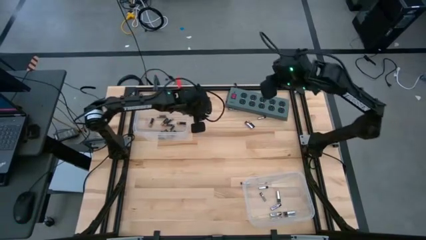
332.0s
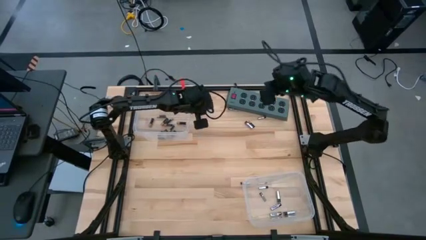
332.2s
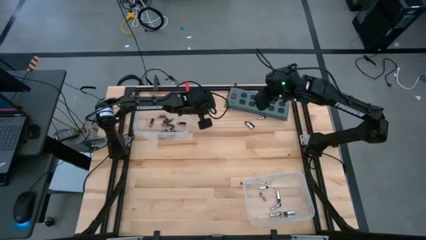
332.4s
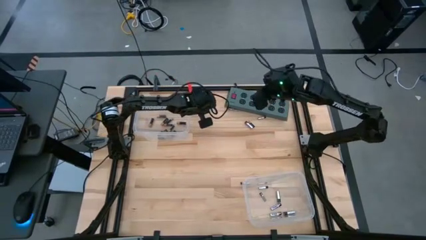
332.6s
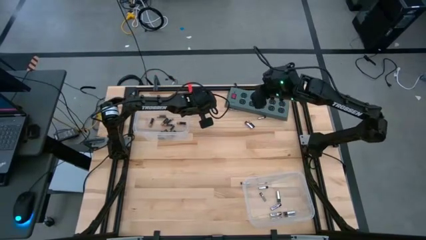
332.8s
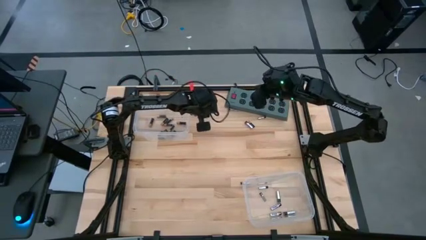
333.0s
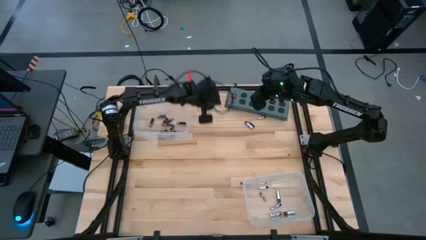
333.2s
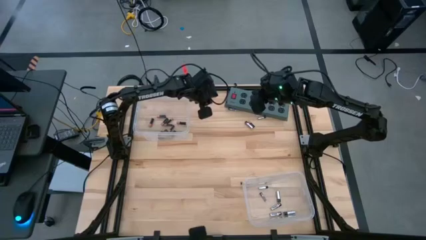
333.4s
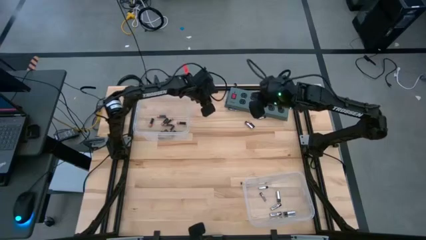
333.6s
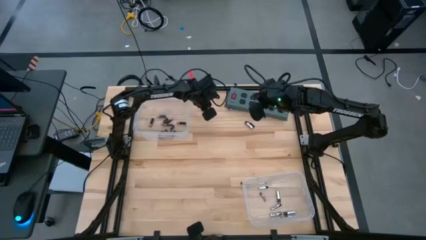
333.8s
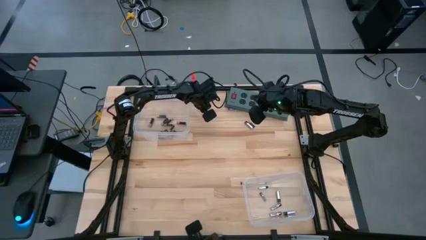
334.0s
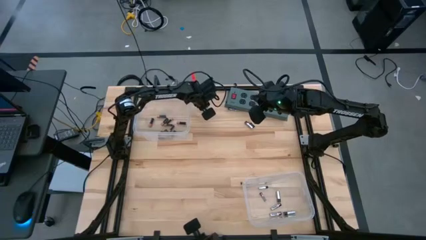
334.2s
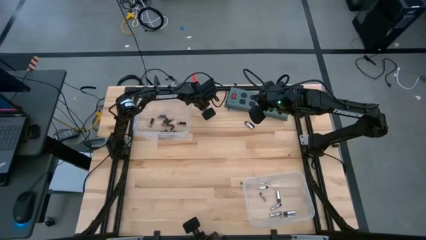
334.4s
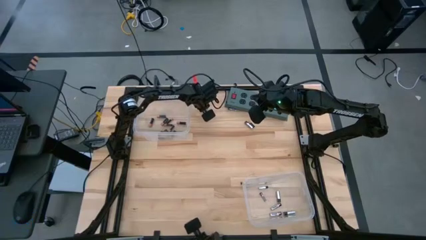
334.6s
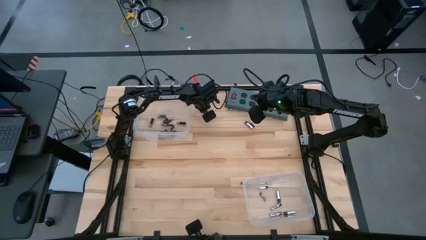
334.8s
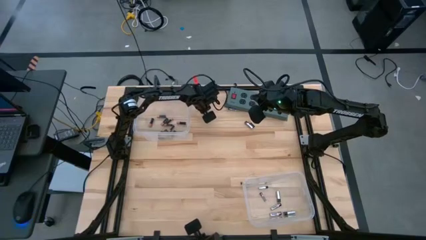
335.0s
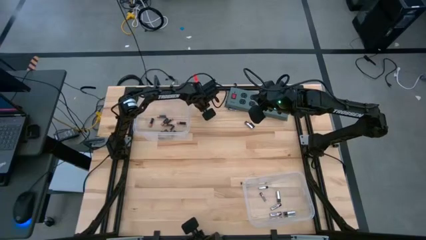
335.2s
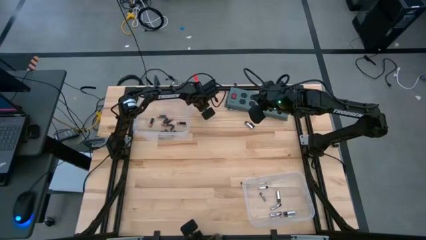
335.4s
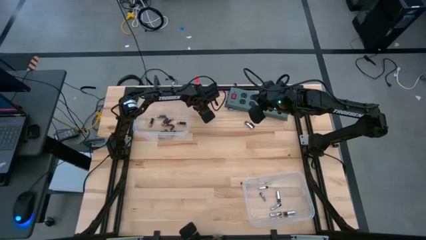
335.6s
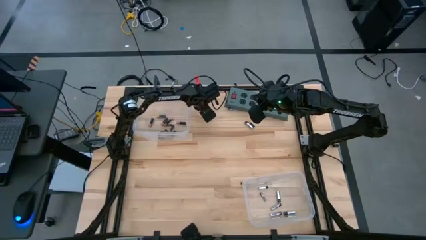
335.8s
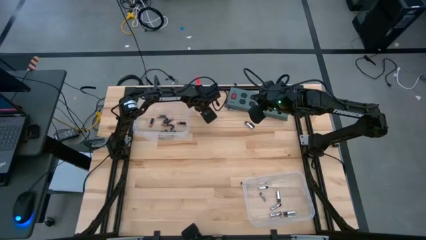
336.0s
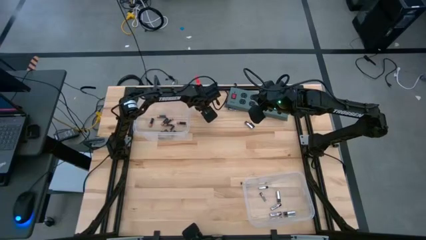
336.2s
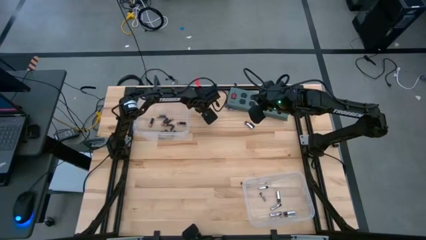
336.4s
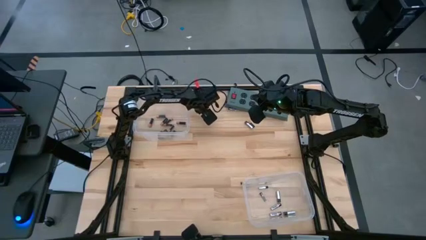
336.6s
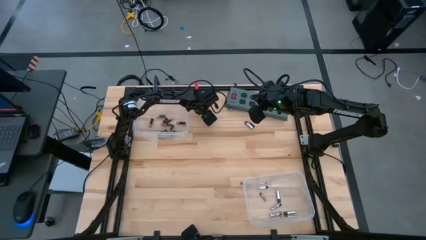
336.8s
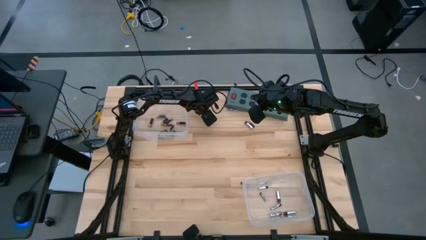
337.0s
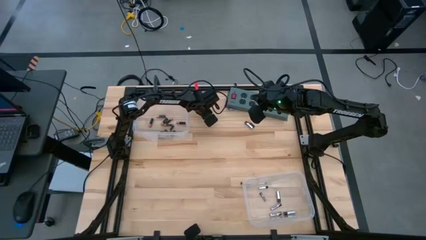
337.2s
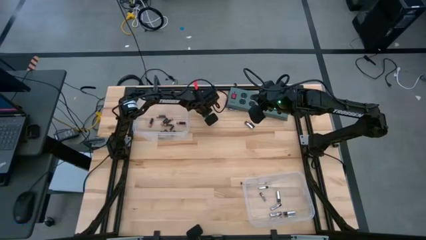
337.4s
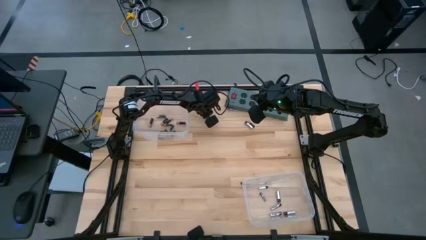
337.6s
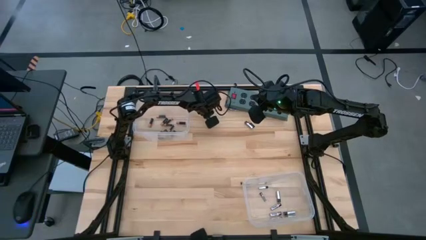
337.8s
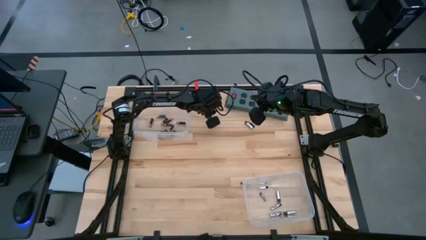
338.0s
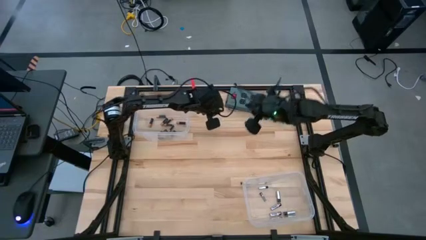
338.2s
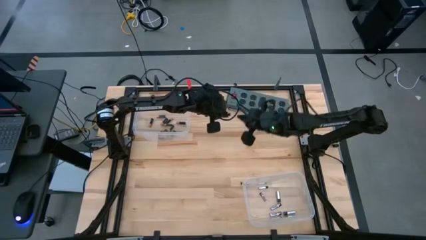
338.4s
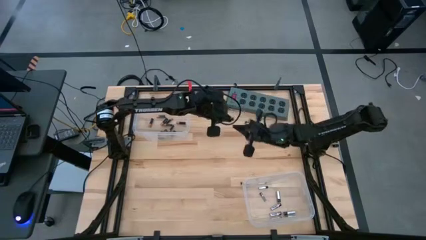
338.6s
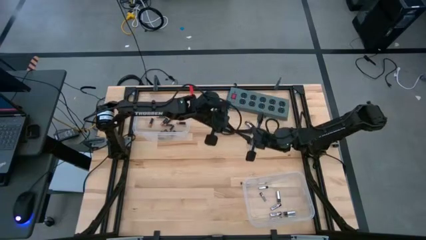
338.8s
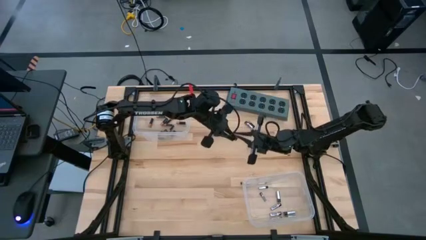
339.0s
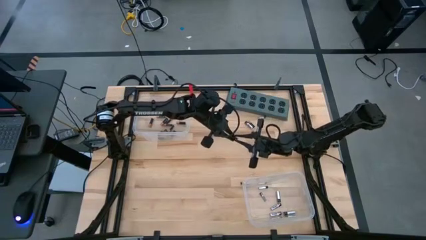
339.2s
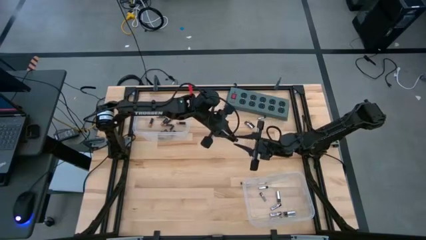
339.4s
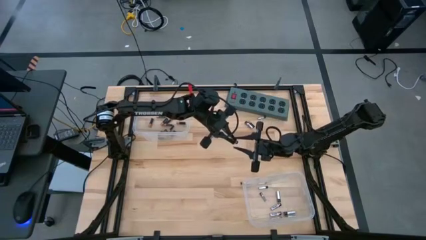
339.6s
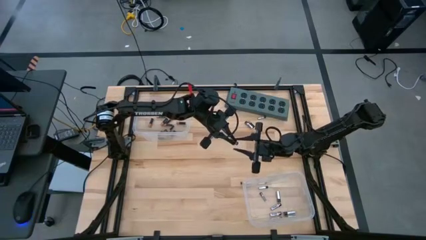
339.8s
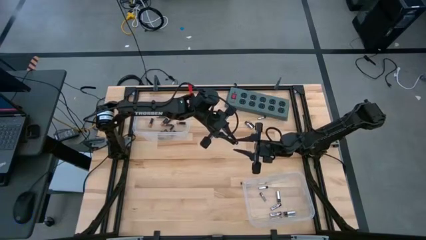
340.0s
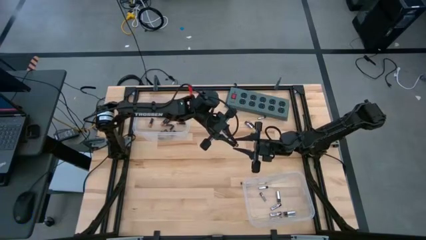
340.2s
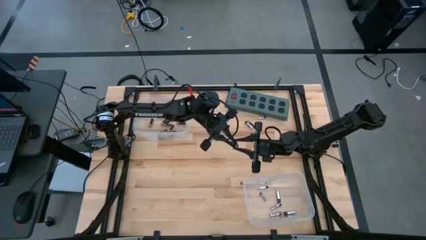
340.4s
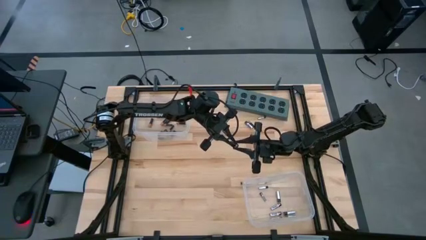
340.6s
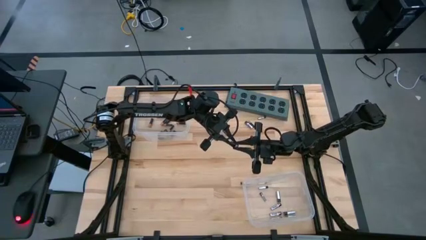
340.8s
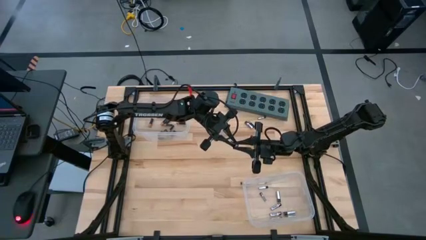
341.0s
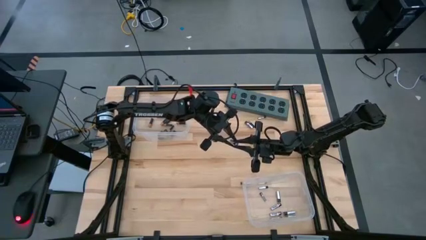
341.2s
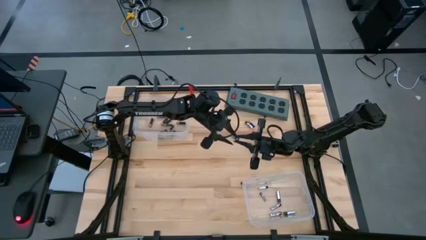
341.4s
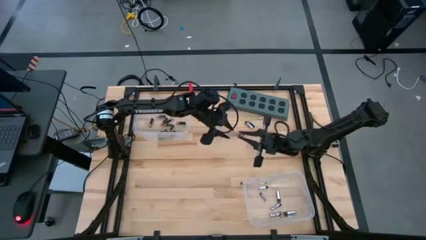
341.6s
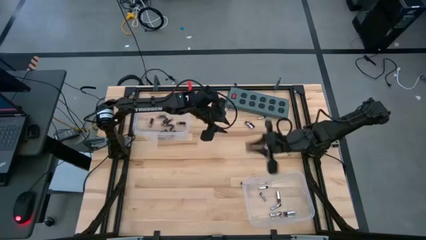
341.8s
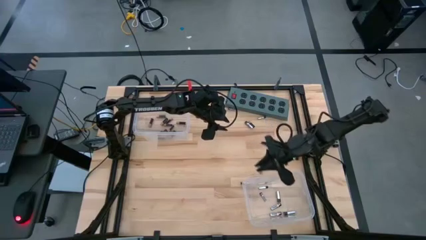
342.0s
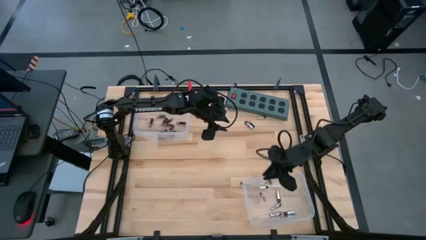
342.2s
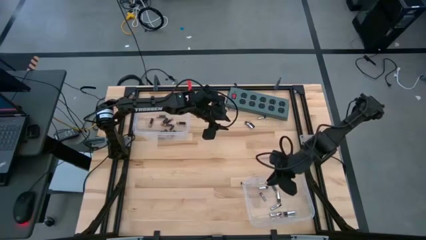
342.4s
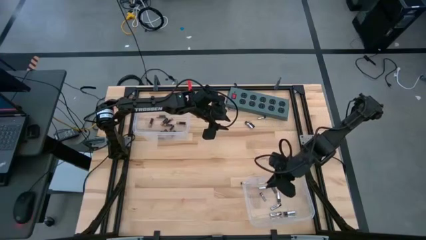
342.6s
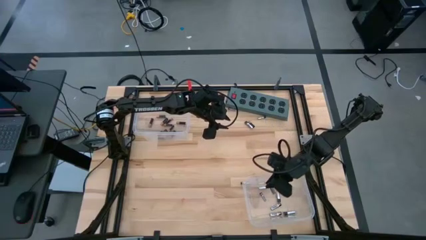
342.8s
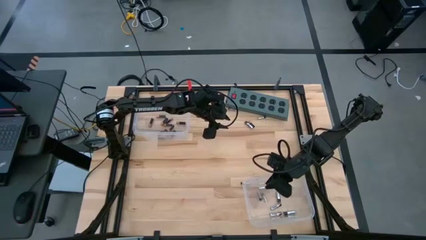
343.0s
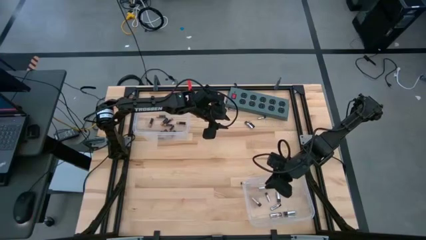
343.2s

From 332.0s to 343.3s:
Task: Sort batteries
Put the silver battery into the bottom transparent bin

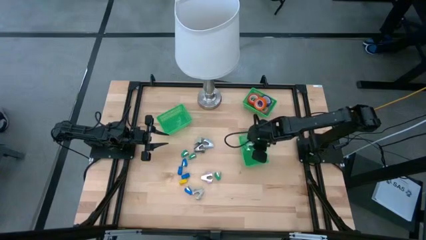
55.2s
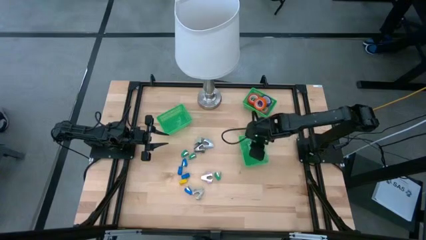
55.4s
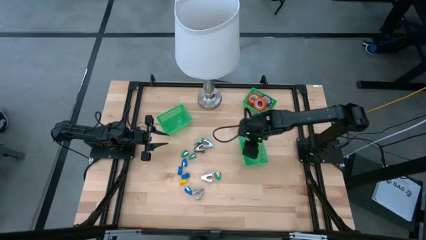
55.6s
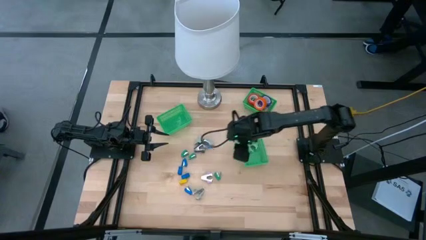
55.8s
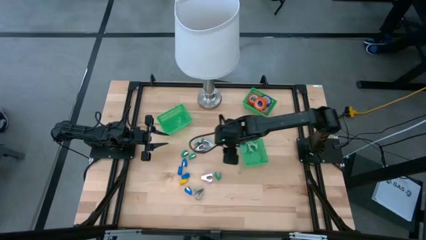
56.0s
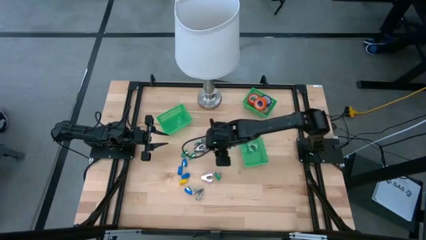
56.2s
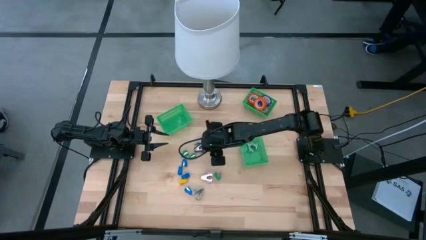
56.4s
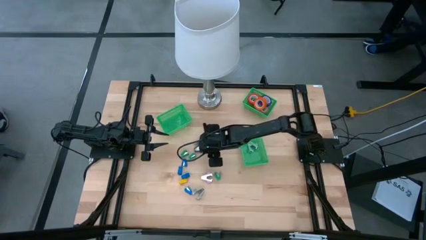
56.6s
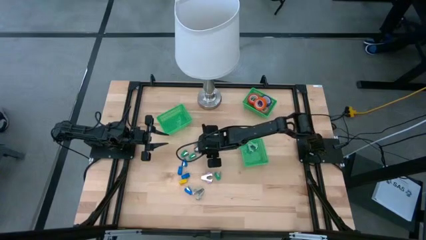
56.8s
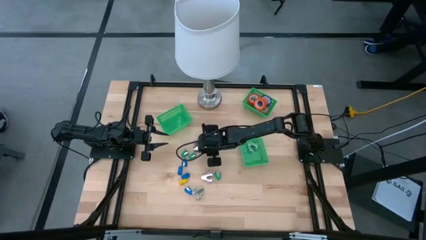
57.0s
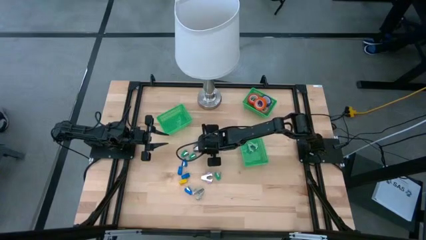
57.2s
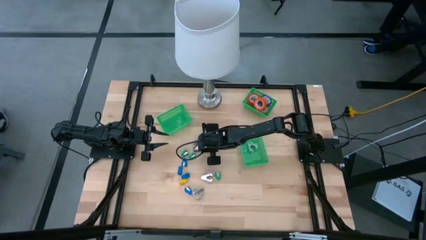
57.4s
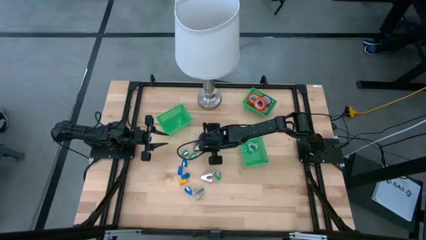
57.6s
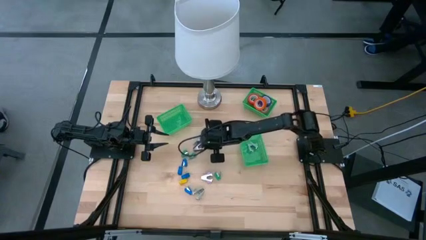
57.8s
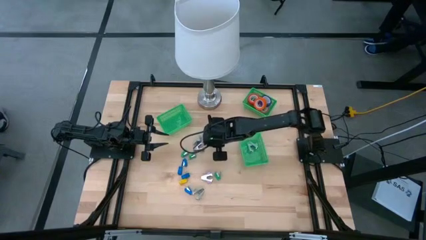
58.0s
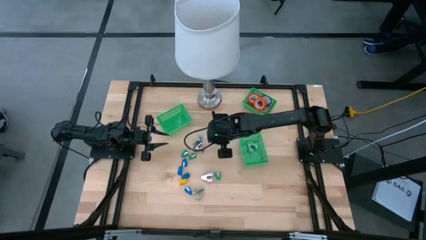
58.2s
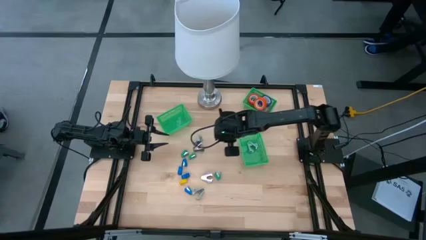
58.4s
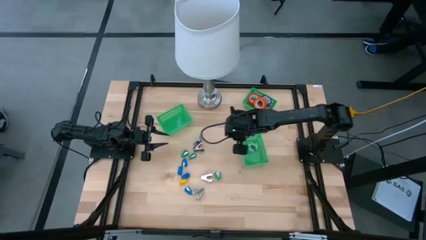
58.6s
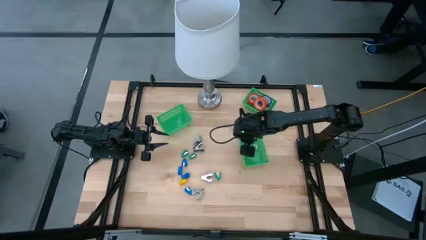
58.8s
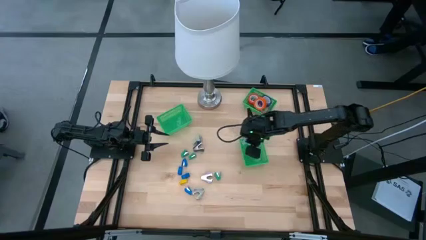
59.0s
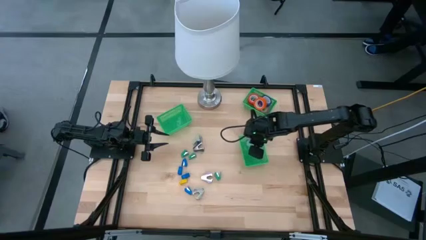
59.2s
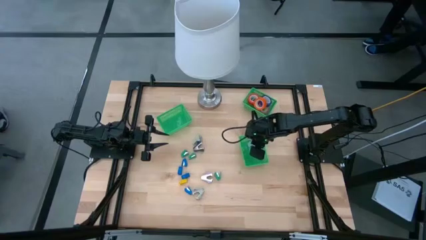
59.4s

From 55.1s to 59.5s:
Task: Pick and place Stapler, Stapler remover, tape
Put the light blue staple remover into the bottom right green bin
